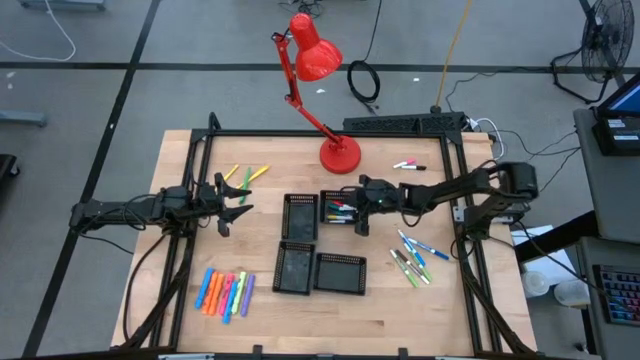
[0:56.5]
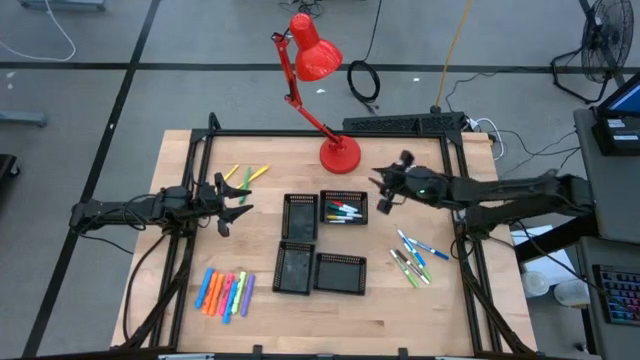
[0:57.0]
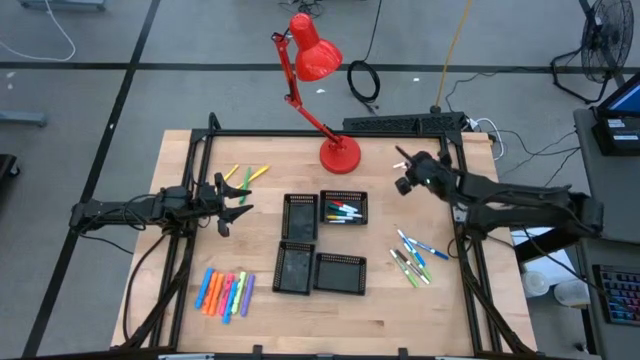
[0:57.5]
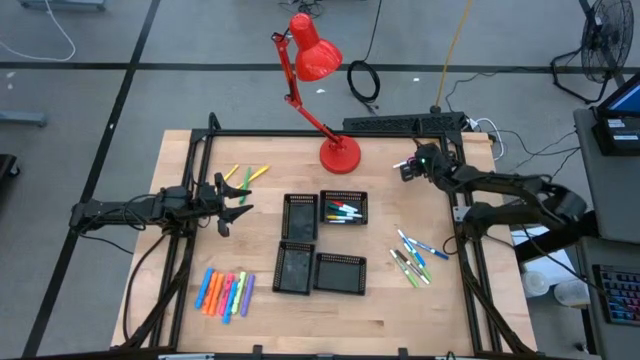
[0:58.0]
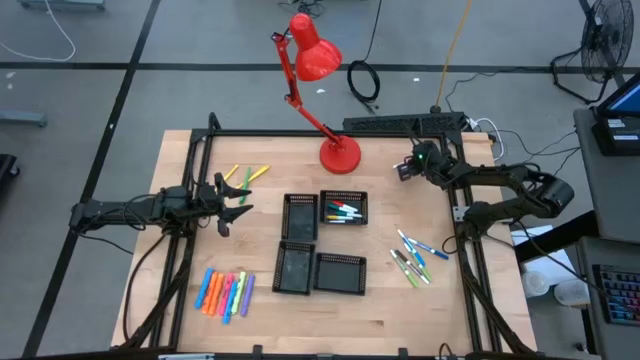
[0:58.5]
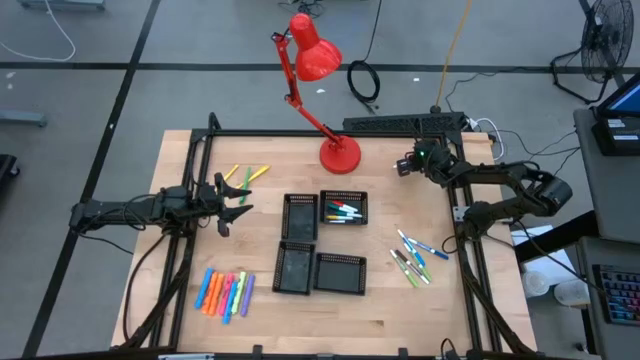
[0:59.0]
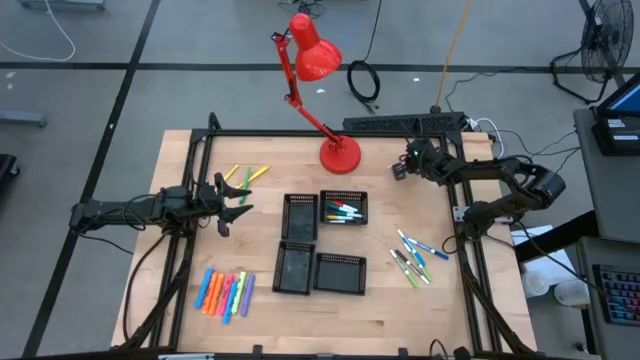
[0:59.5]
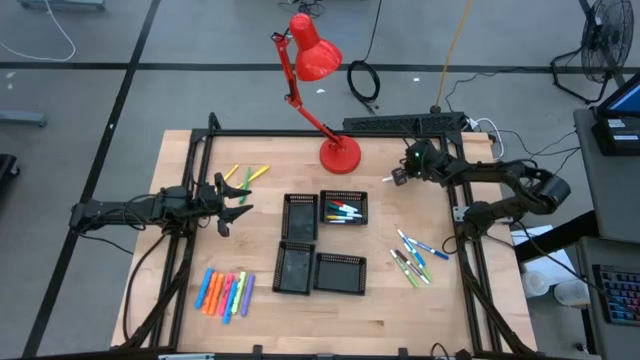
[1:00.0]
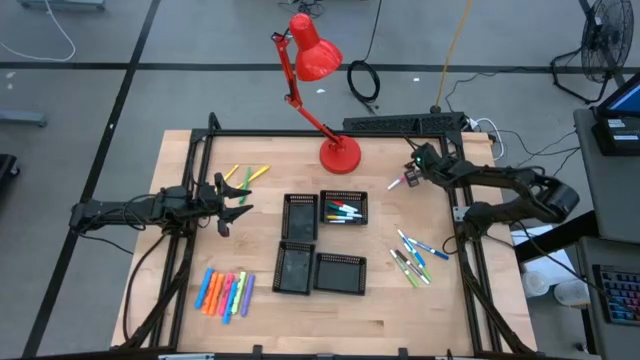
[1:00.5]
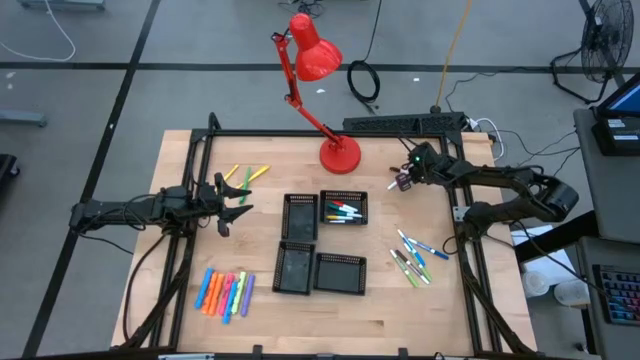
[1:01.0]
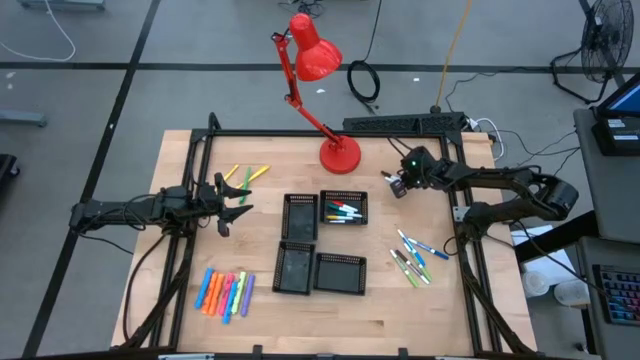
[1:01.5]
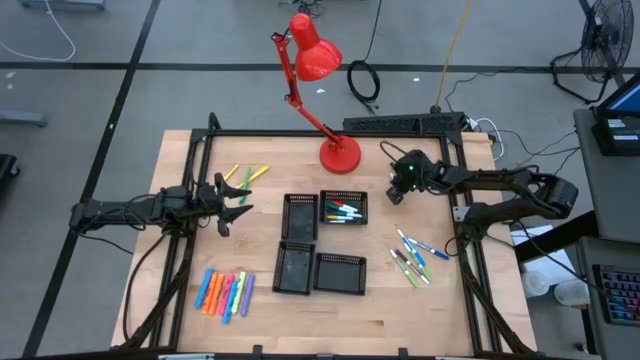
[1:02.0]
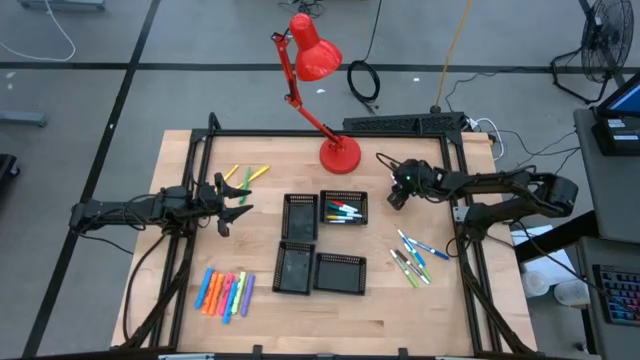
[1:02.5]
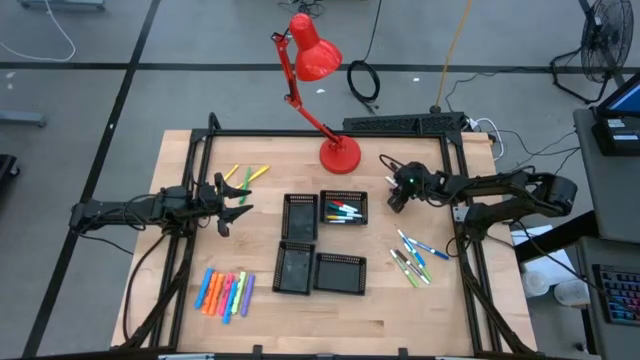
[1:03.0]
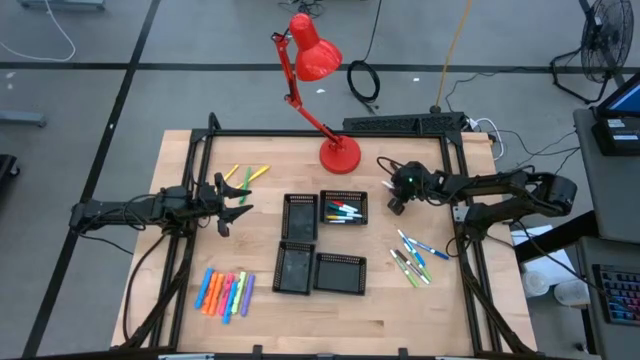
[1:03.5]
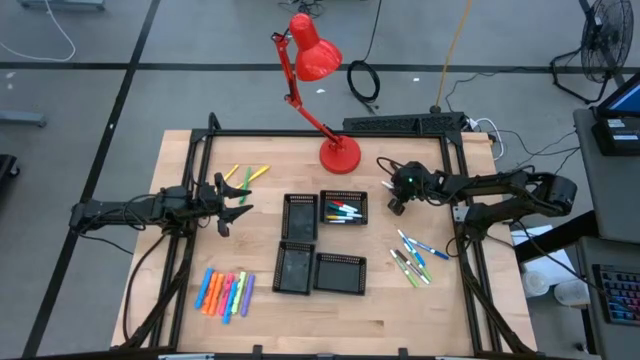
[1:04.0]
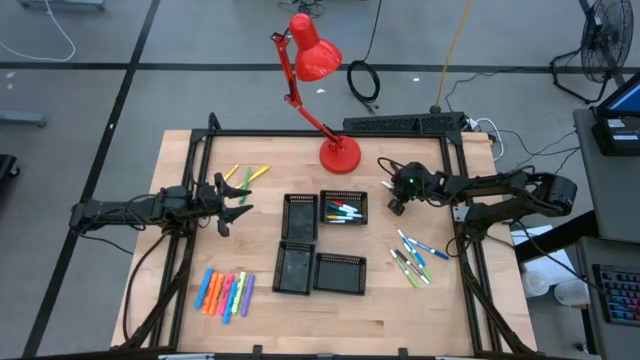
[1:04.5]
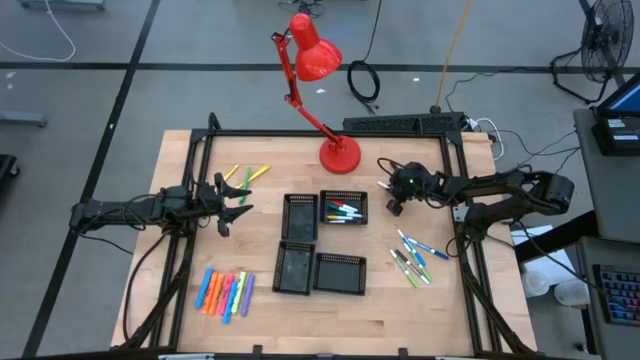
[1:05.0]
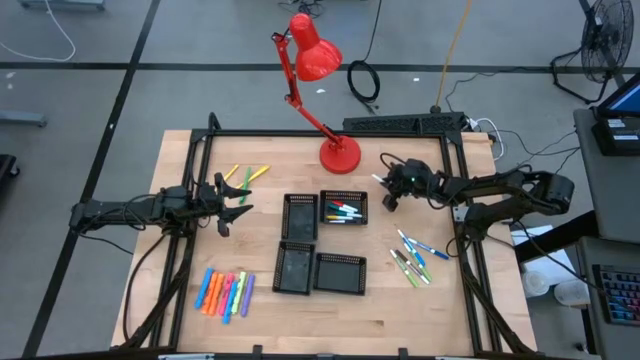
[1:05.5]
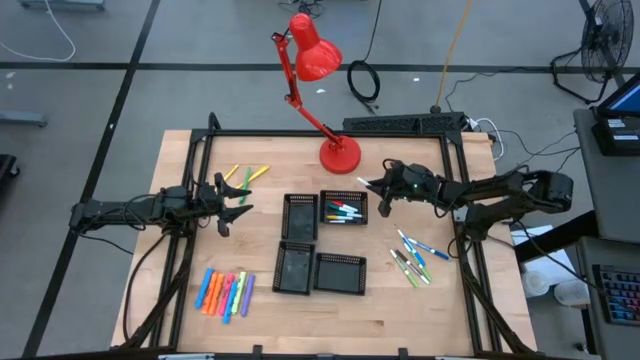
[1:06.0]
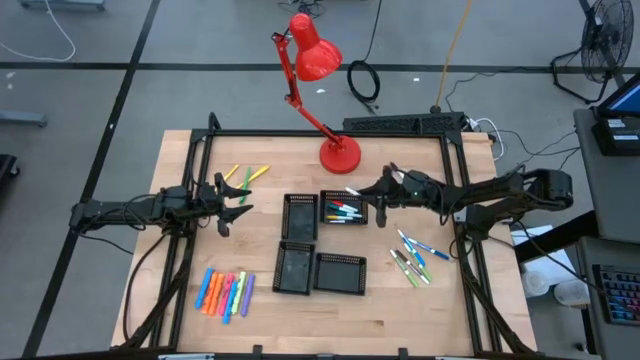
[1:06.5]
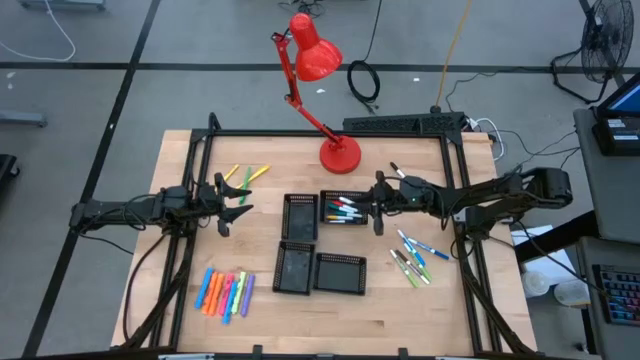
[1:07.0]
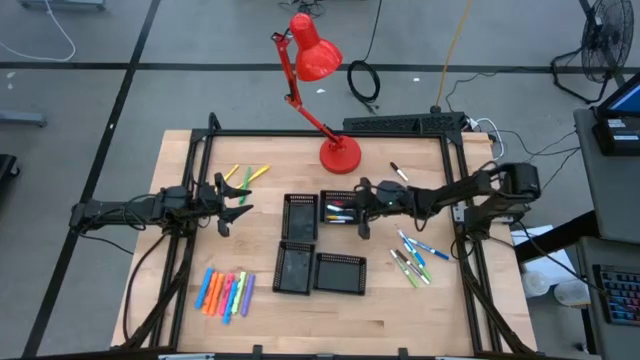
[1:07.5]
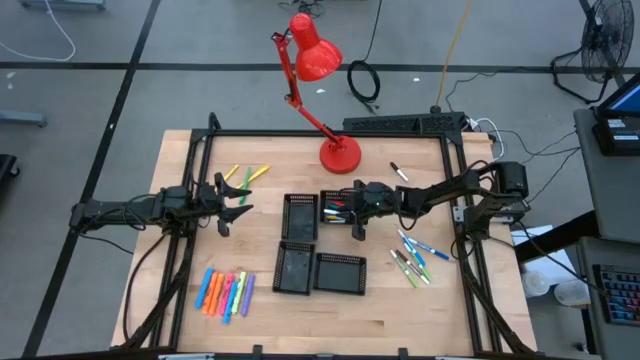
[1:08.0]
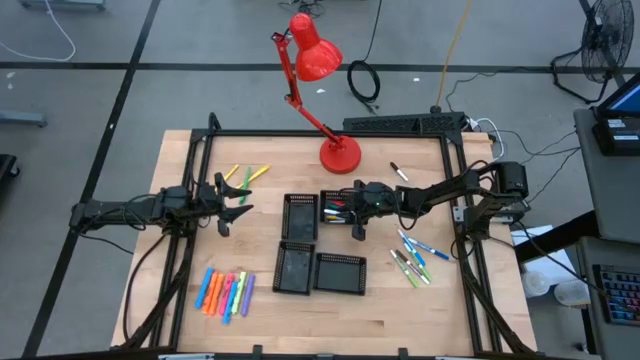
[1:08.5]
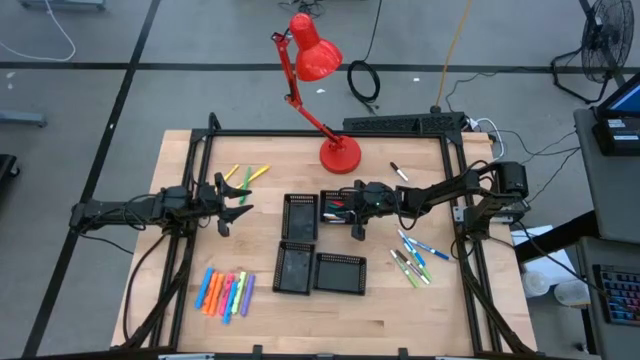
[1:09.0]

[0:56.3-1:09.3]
Task: Pick & Place Markers
Put the pink highlighter pen into the top right black bin

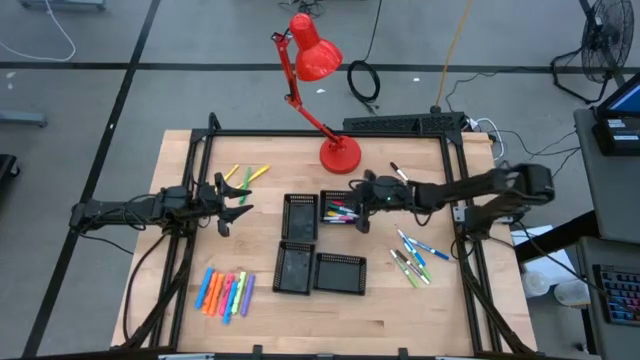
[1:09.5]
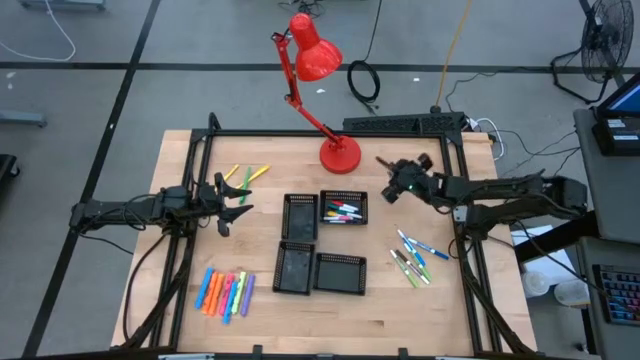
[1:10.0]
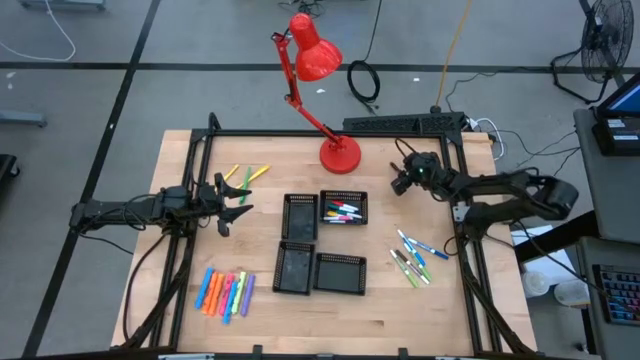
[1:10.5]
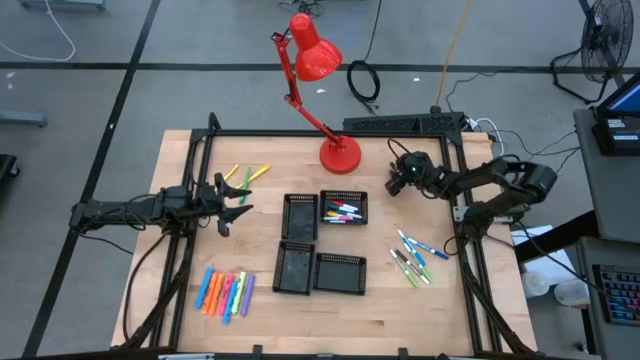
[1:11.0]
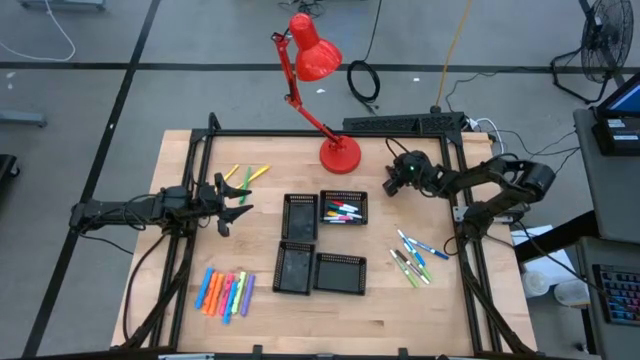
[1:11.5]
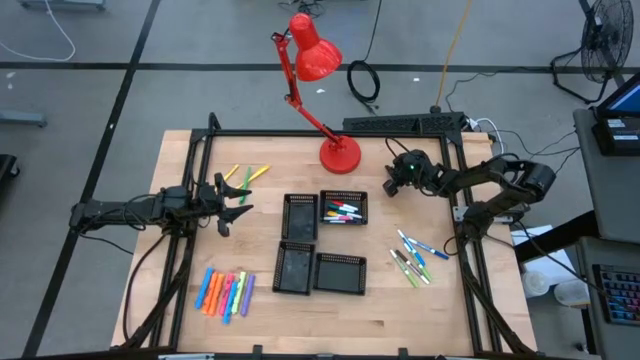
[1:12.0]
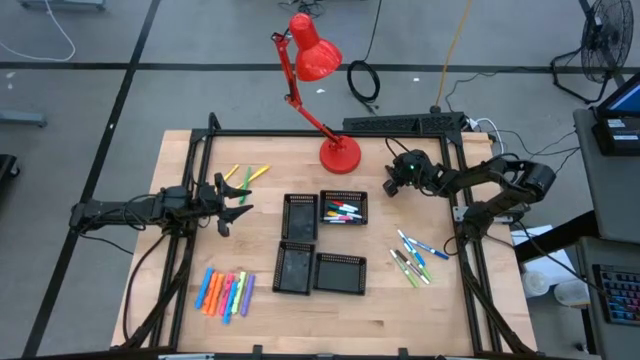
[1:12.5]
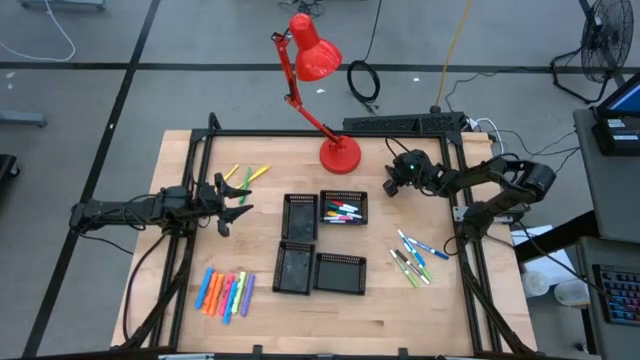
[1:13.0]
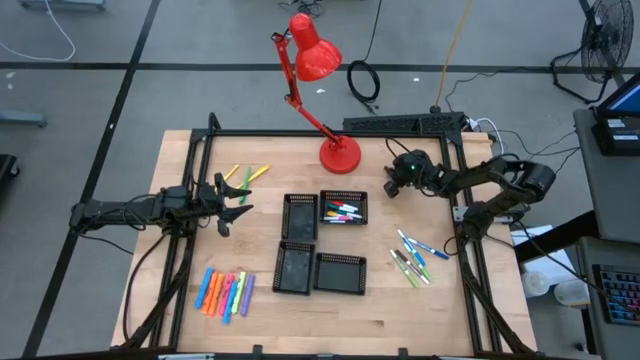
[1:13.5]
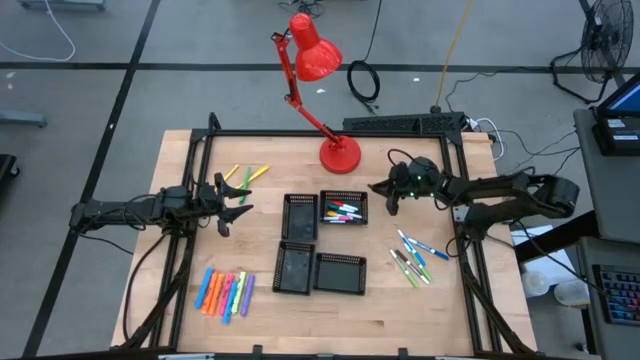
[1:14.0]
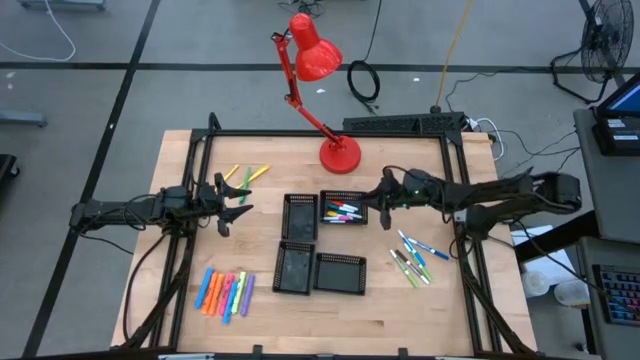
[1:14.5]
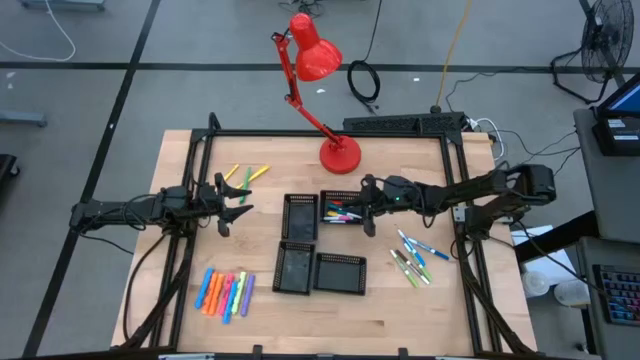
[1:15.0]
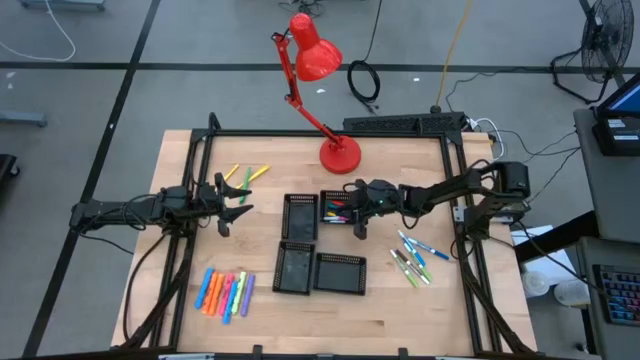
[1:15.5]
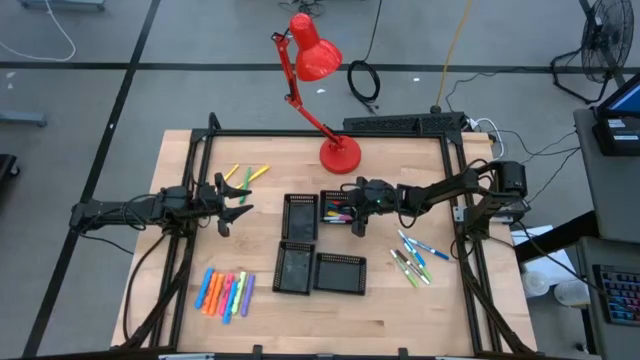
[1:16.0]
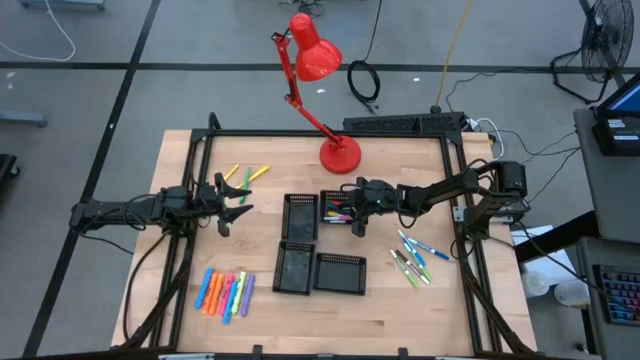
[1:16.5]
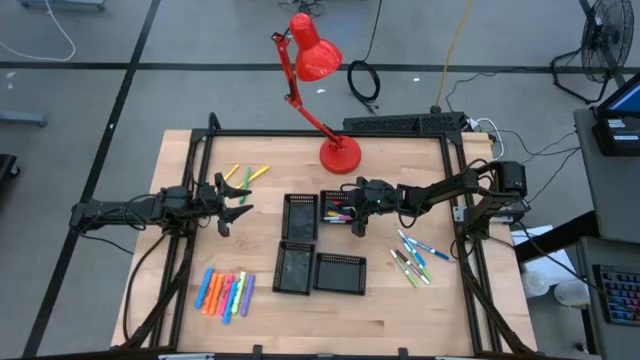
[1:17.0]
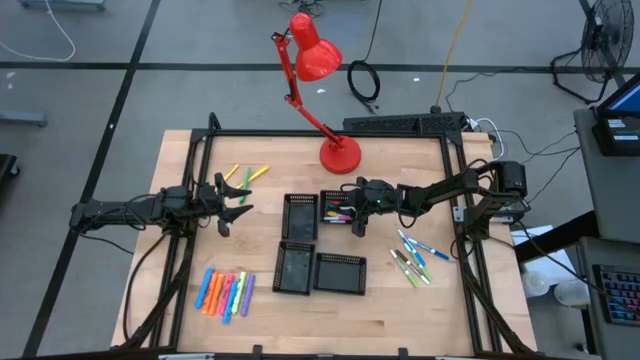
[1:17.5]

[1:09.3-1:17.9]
Put the black highlighter pen into the top right black bin
